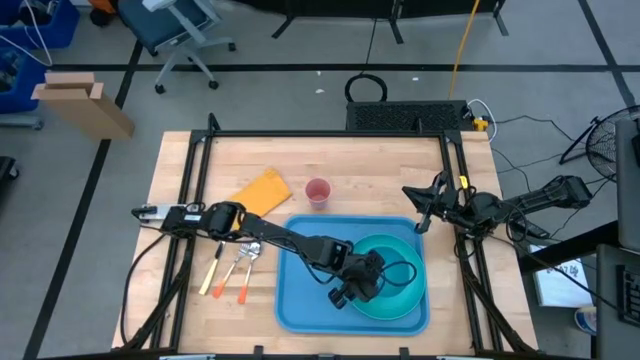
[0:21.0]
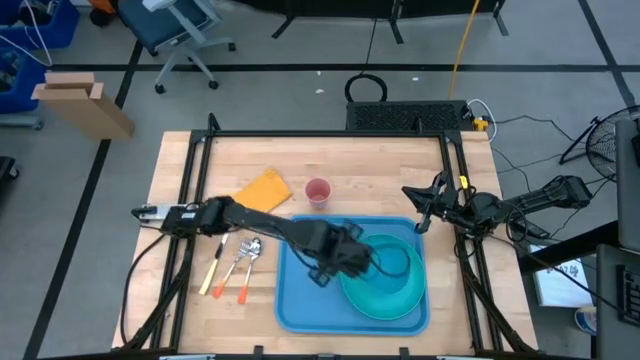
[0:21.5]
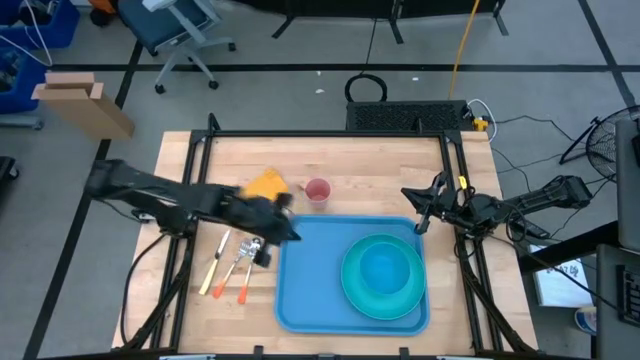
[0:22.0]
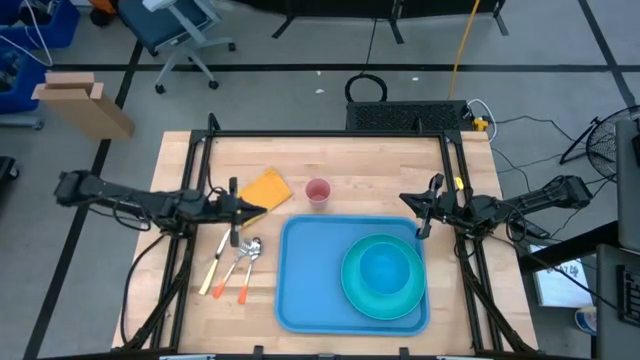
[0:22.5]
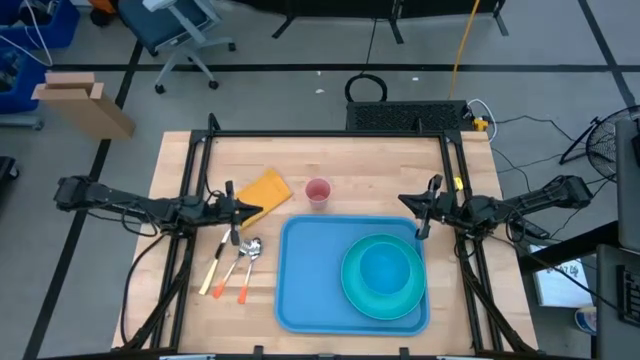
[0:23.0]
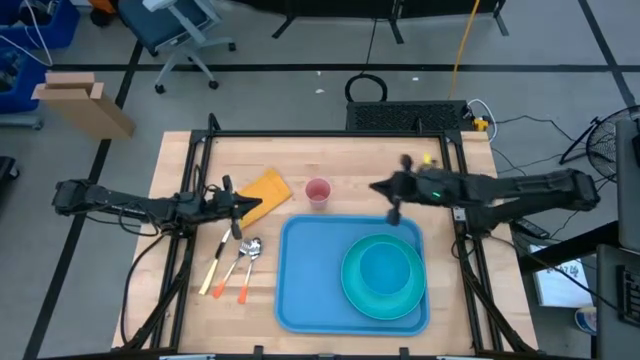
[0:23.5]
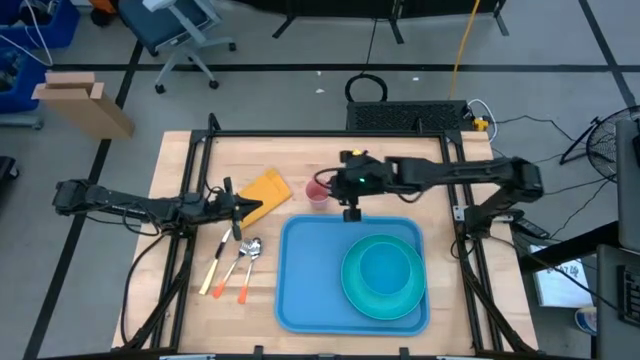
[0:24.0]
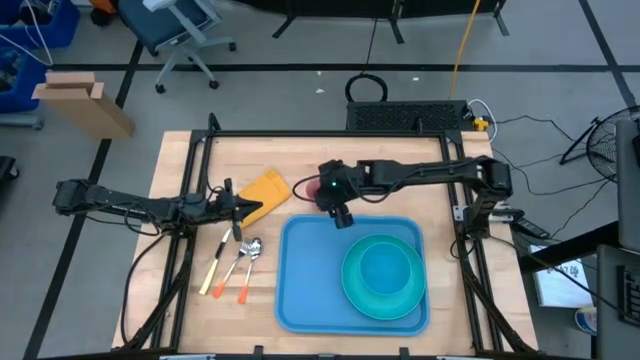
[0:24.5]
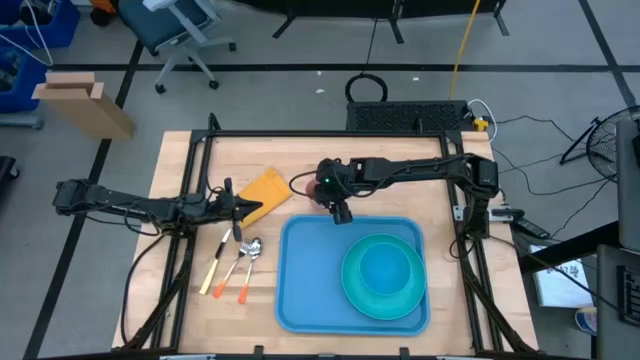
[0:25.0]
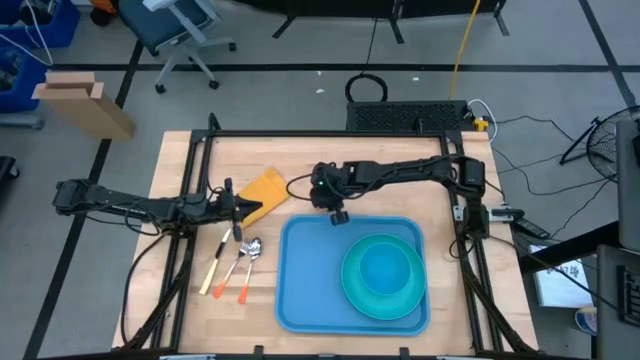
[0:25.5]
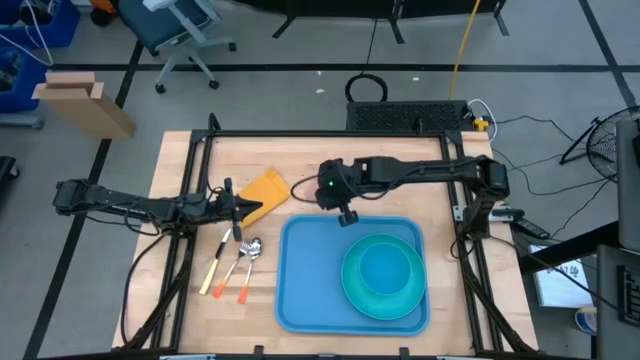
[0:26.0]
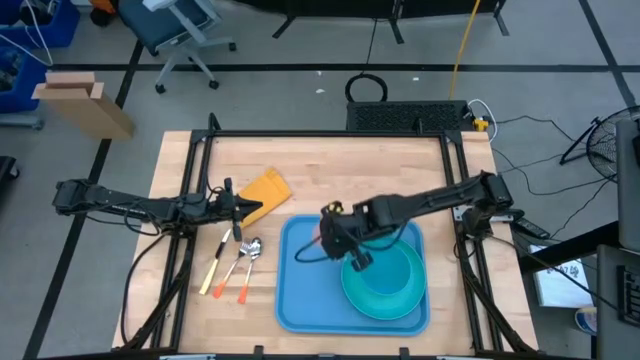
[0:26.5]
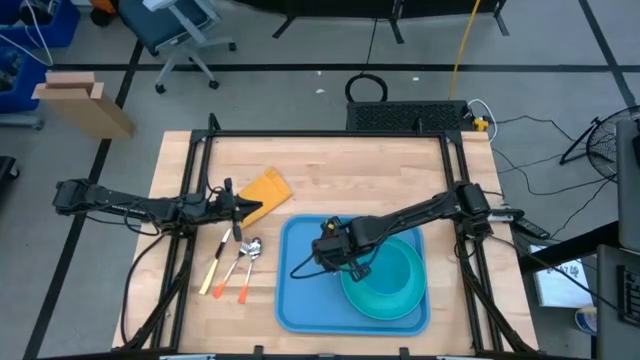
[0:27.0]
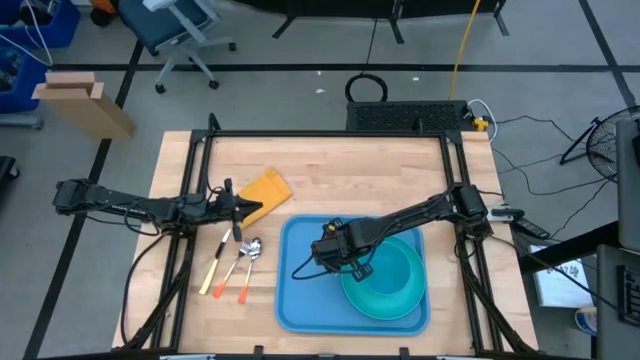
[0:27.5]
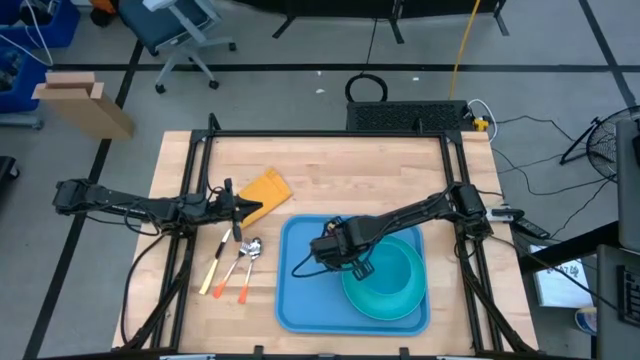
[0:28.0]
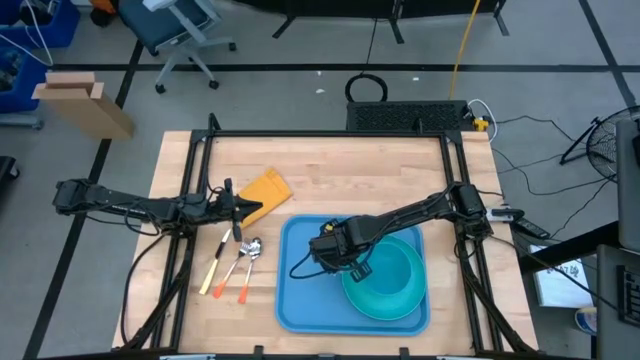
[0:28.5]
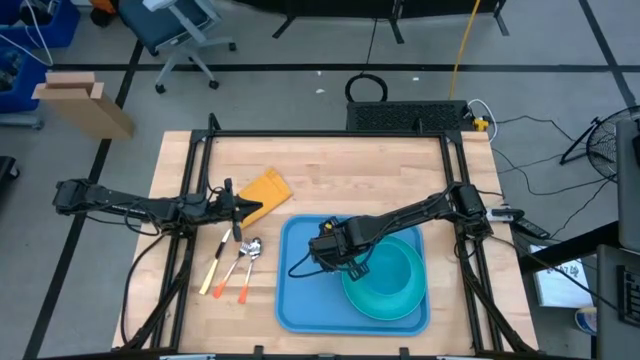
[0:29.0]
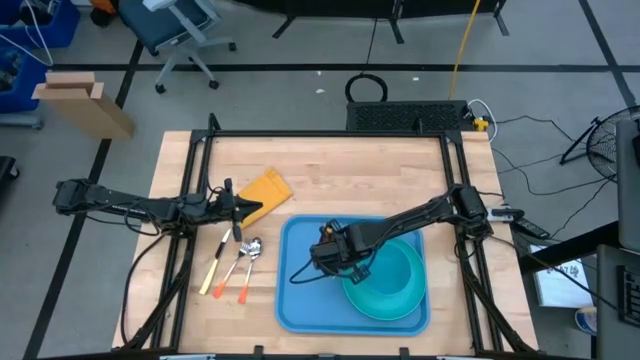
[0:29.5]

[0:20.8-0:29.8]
Task: Set up tray
Put the pink cup on the tray

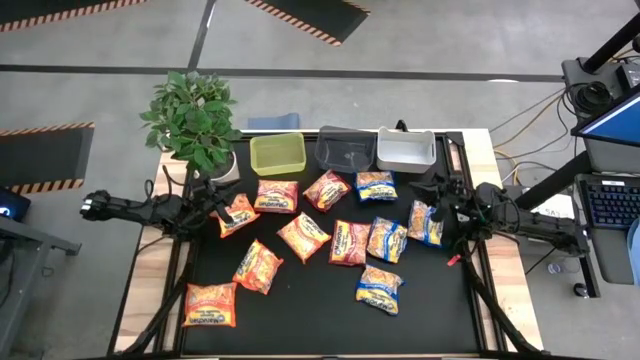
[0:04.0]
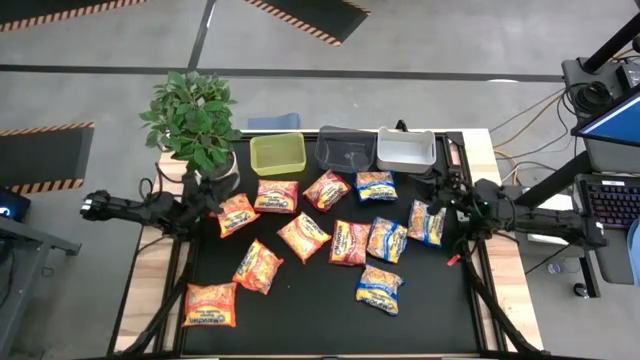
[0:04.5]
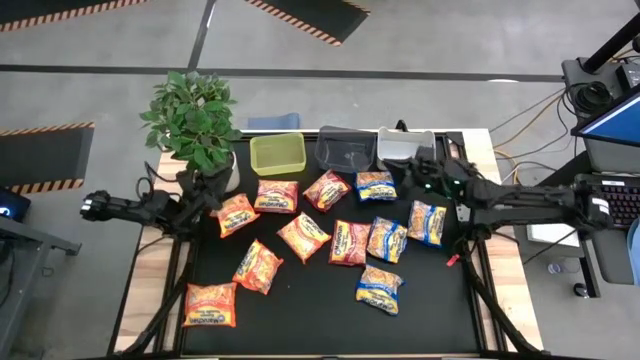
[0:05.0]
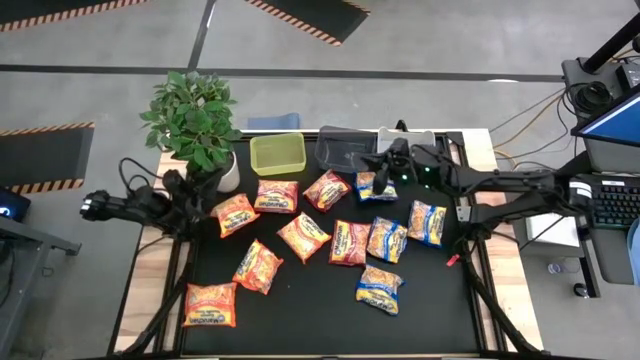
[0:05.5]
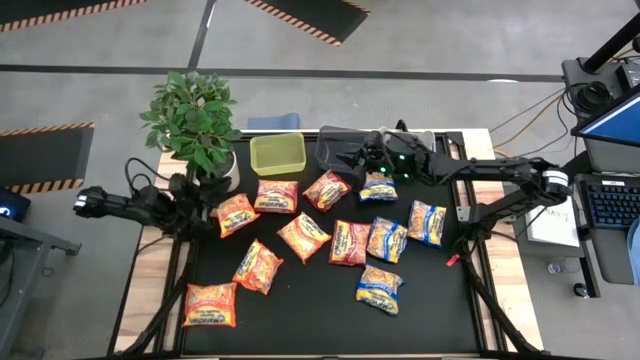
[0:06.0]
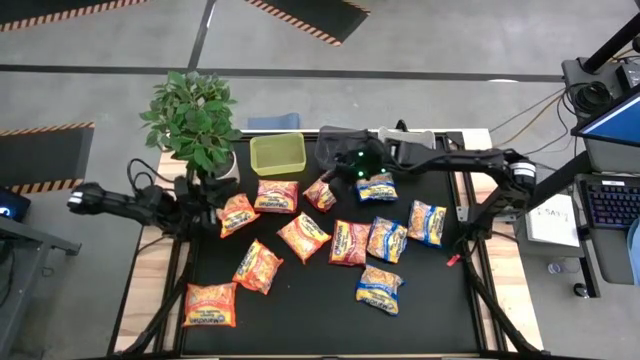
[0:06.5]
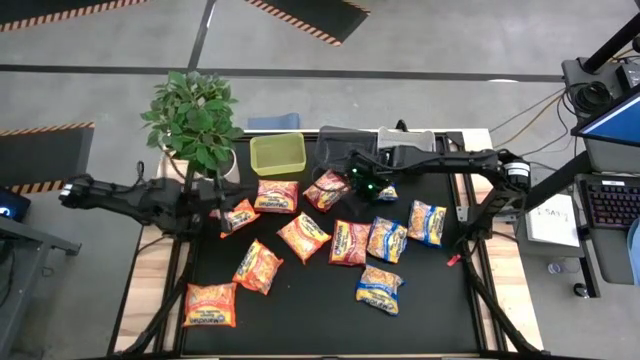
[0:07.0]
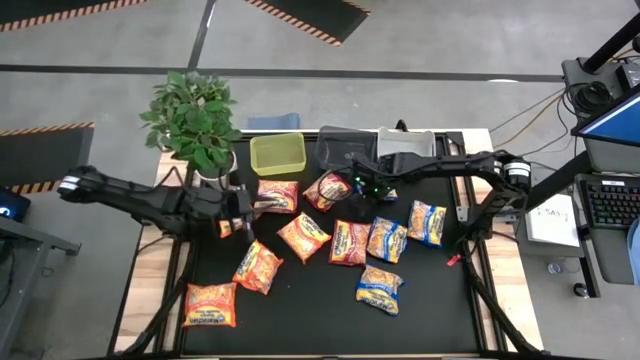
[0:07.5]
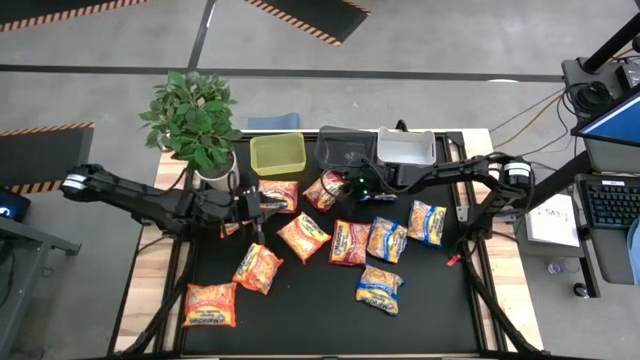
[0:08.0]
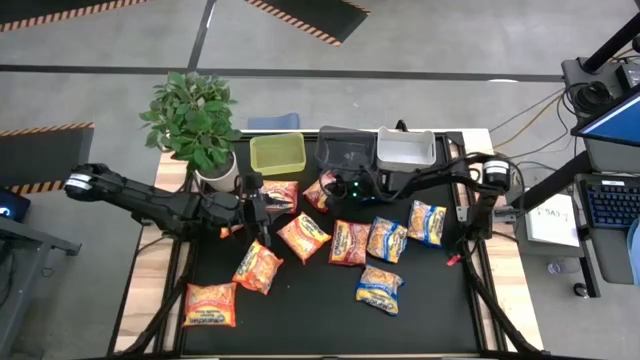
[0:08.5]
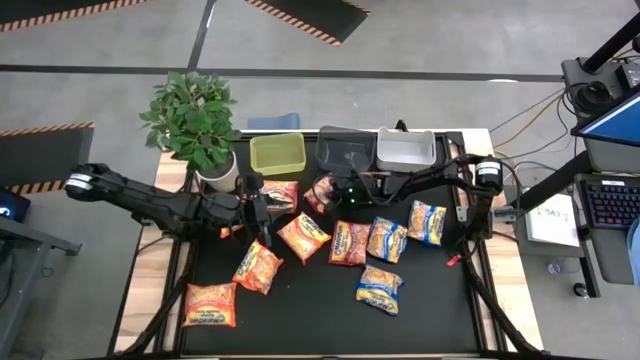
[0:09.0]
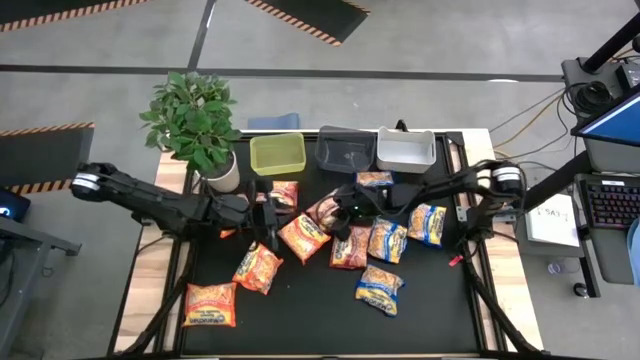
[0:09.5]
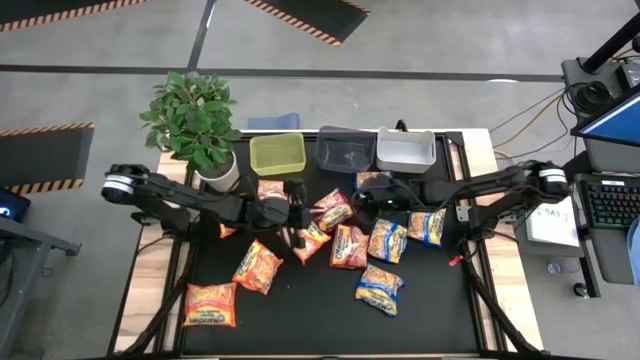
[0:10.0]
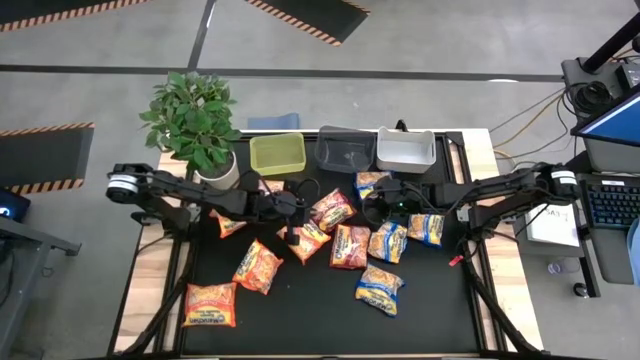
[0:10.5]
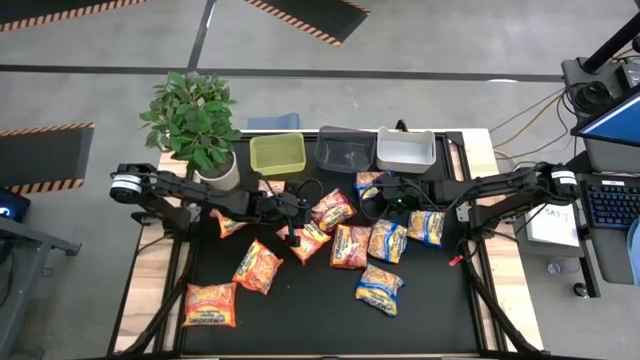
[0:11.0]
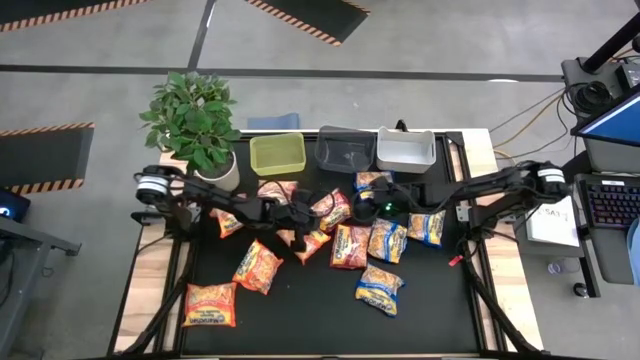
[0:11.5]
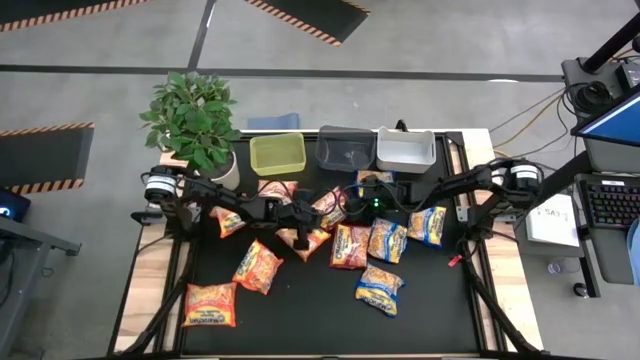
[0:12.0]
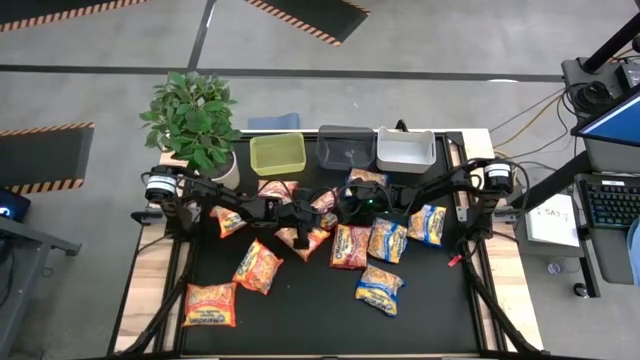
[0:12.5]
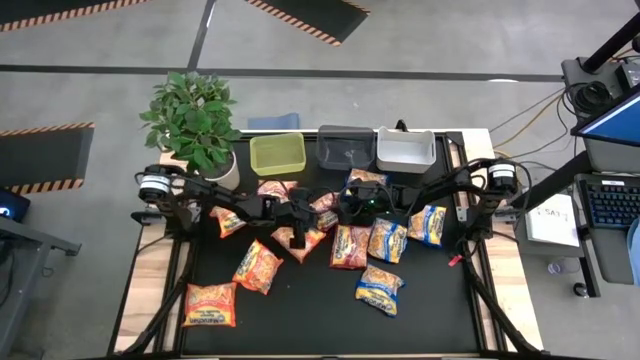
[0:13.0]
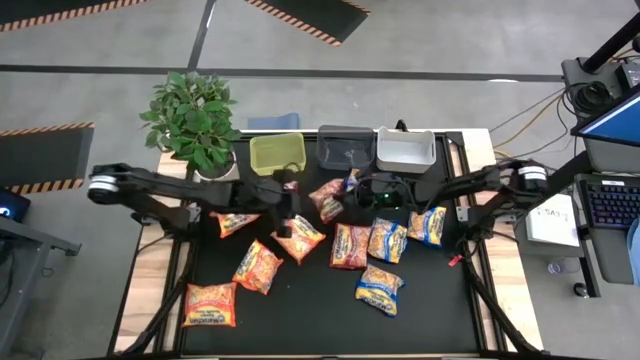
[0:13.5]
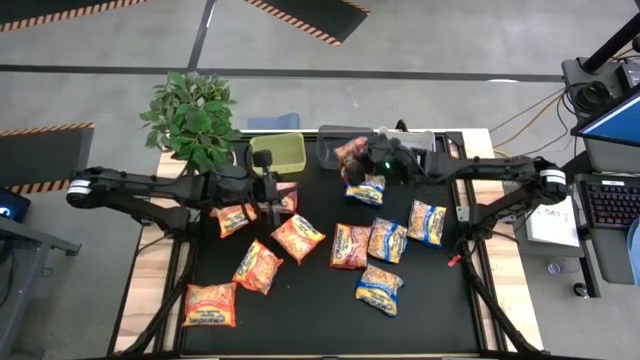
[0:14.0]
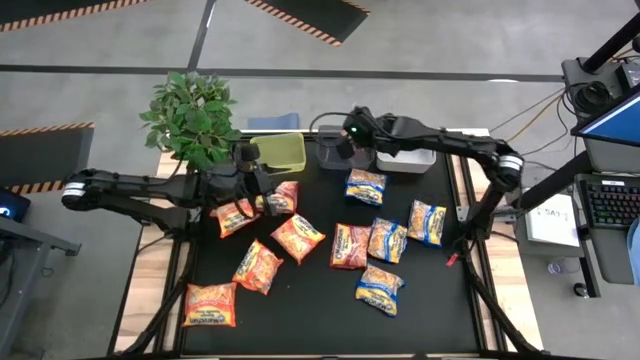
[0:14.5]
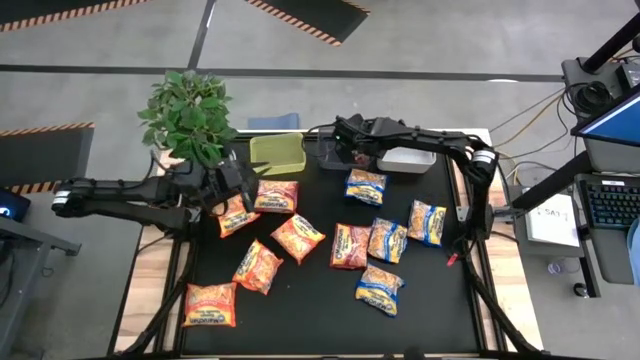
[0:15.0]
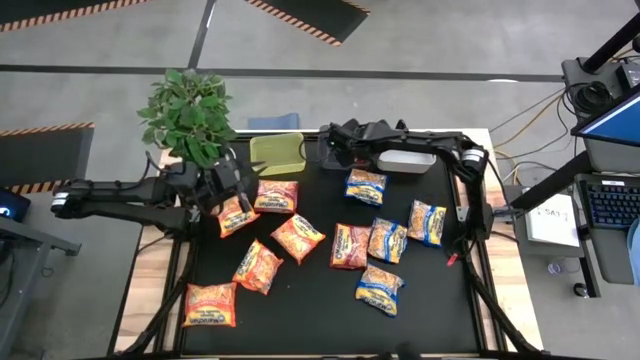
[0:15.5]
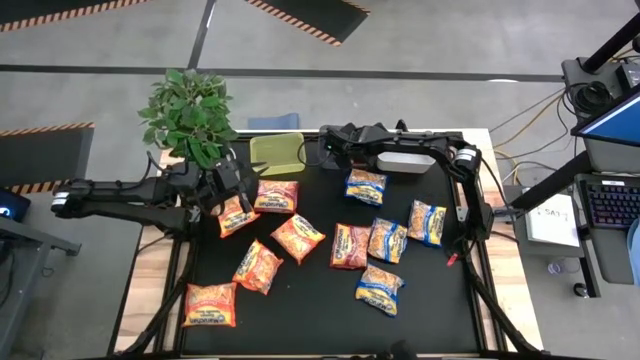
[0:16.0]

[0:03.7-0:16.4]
Task: Sort Maruchan noodles
Put the top right red noodle pack into the black bin
